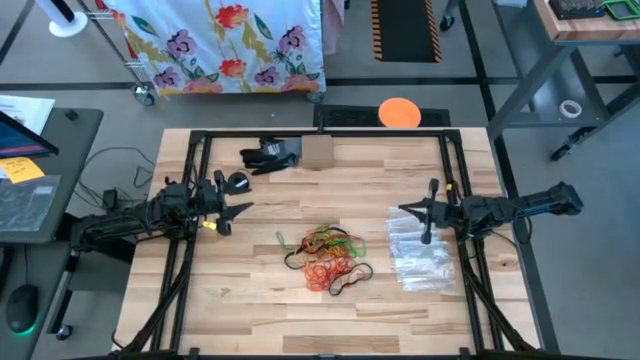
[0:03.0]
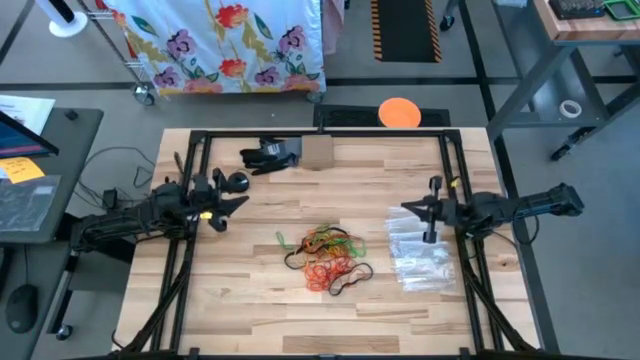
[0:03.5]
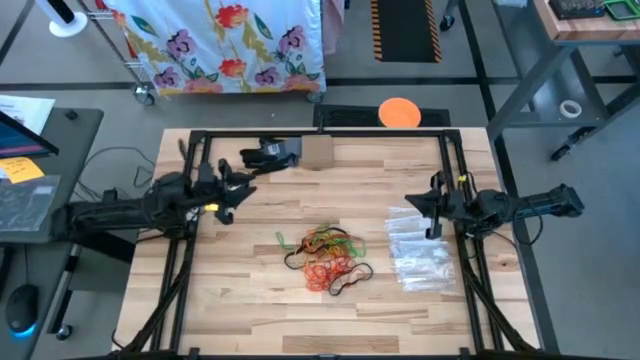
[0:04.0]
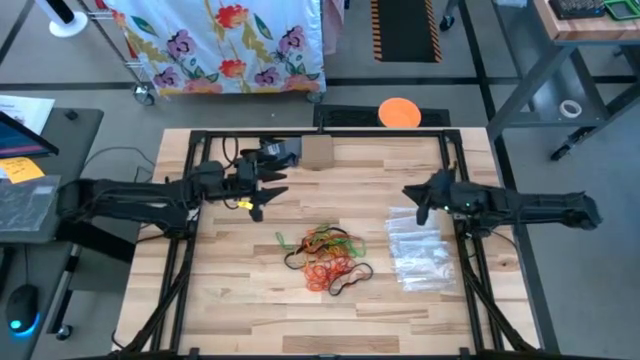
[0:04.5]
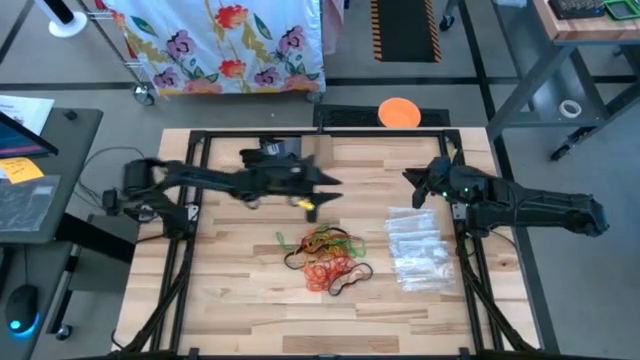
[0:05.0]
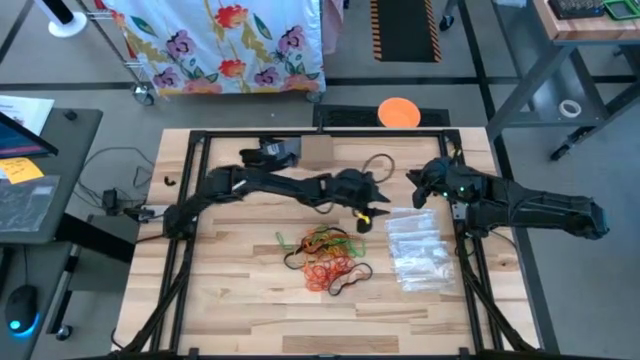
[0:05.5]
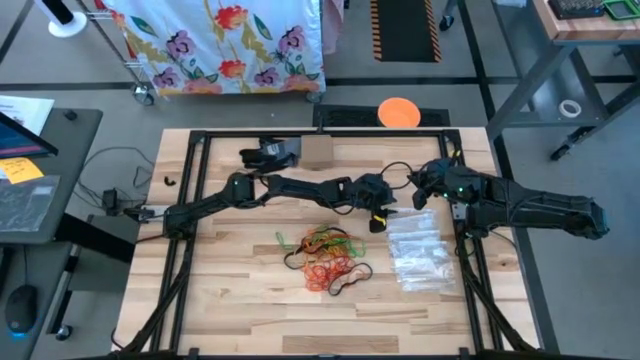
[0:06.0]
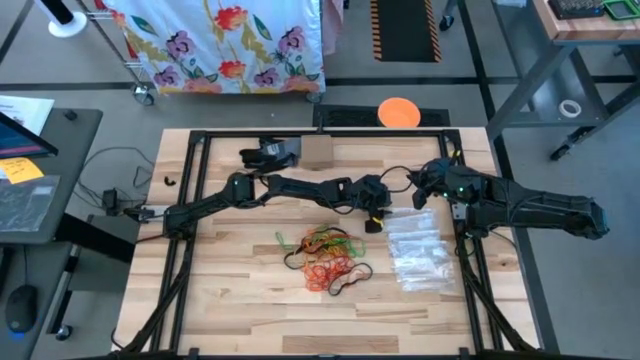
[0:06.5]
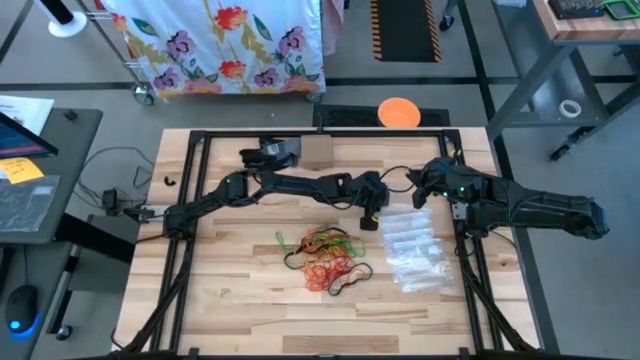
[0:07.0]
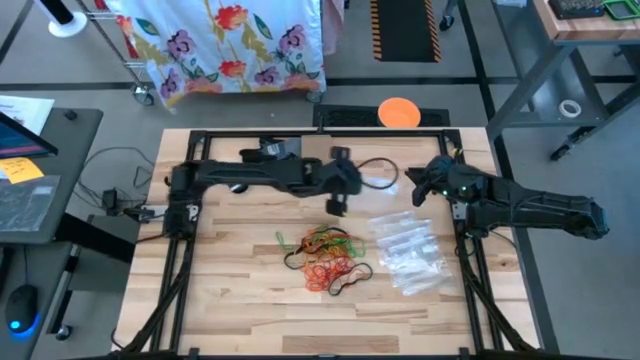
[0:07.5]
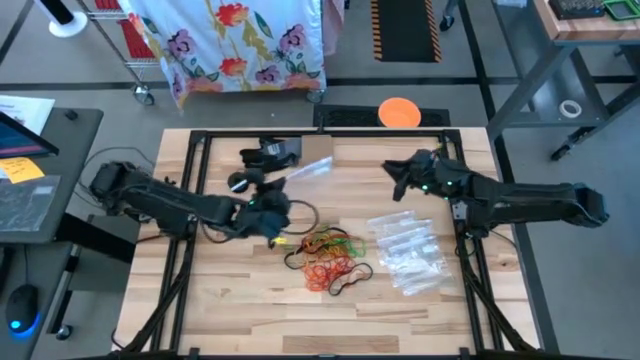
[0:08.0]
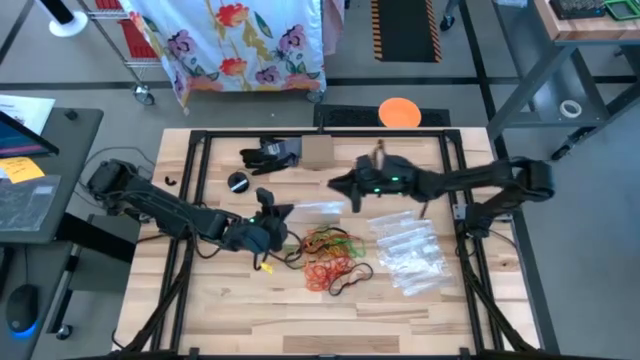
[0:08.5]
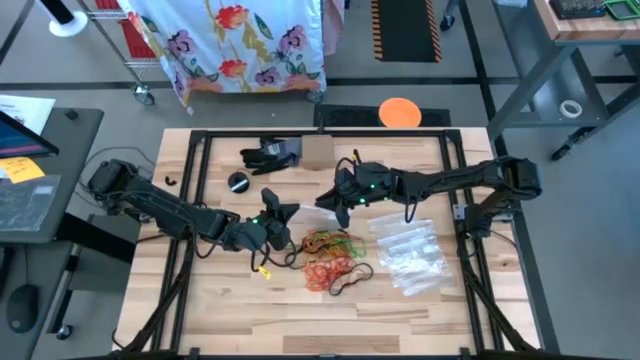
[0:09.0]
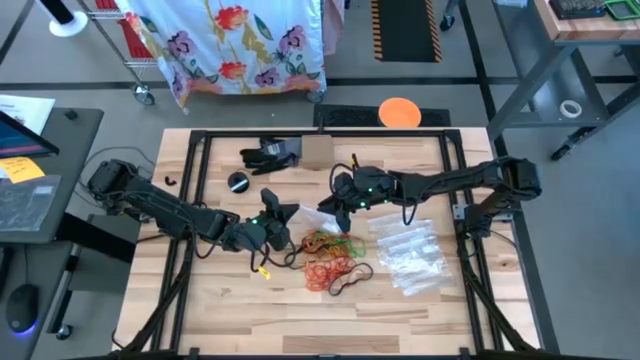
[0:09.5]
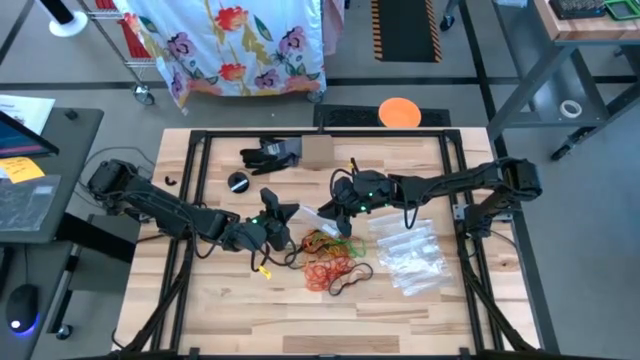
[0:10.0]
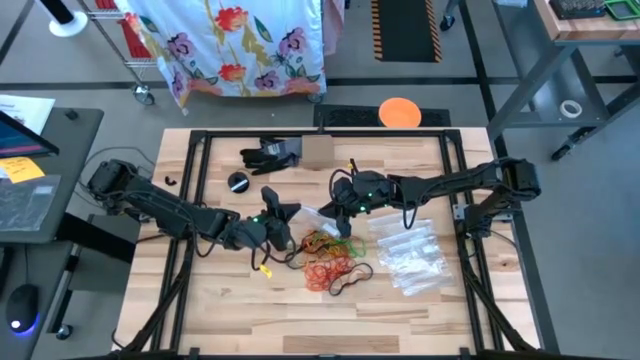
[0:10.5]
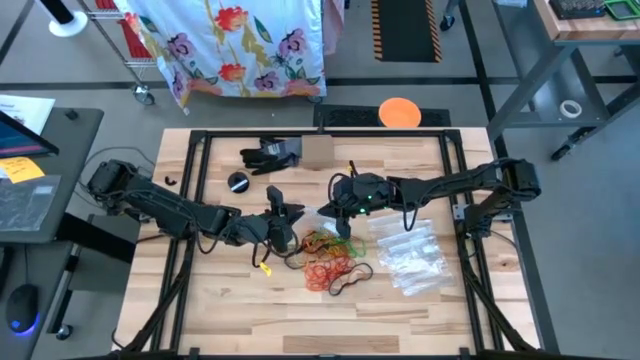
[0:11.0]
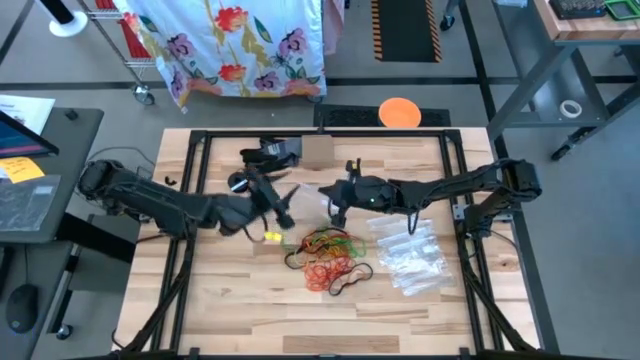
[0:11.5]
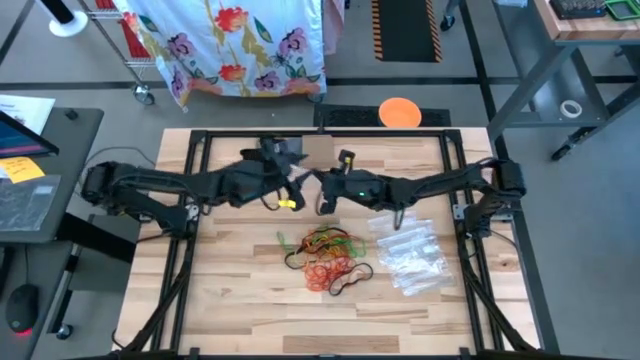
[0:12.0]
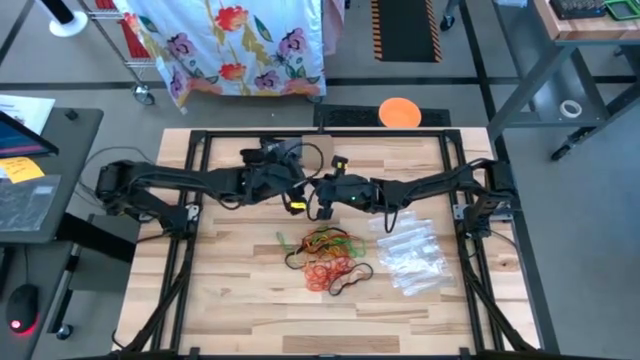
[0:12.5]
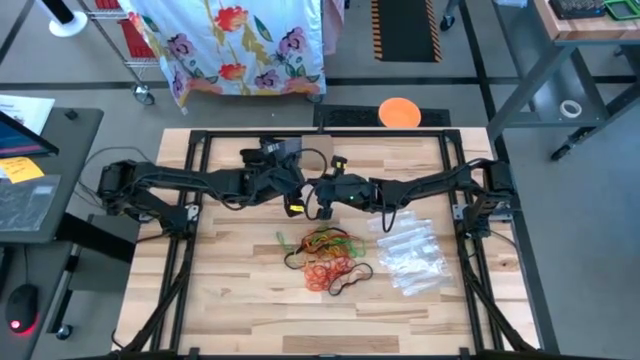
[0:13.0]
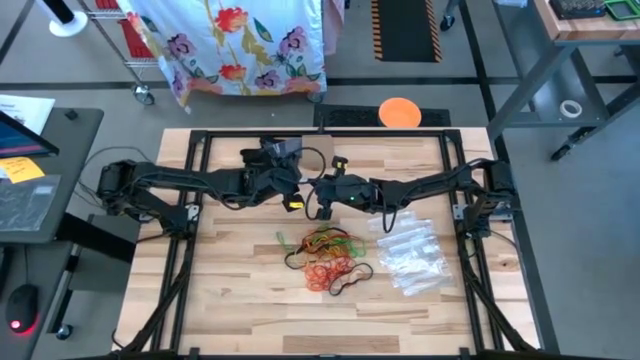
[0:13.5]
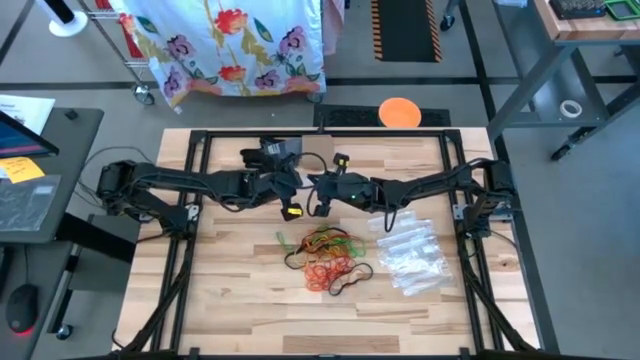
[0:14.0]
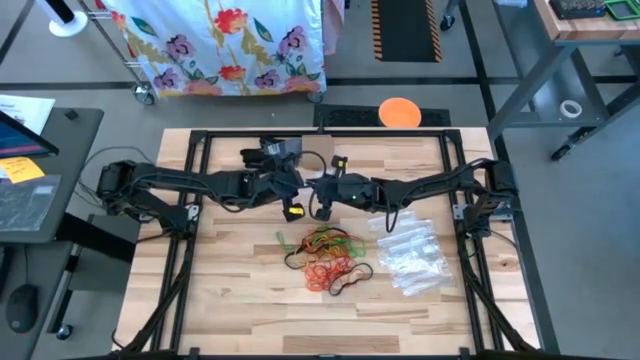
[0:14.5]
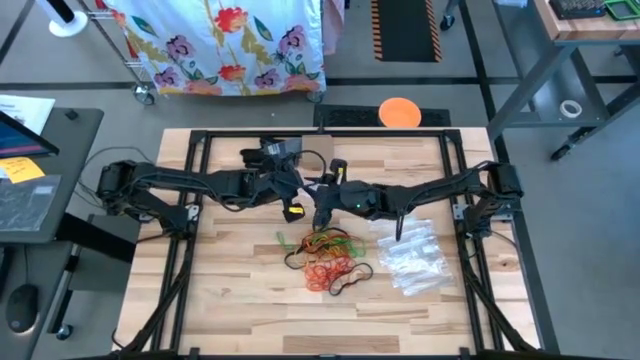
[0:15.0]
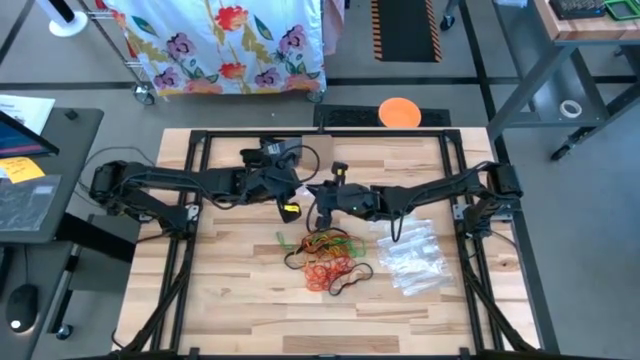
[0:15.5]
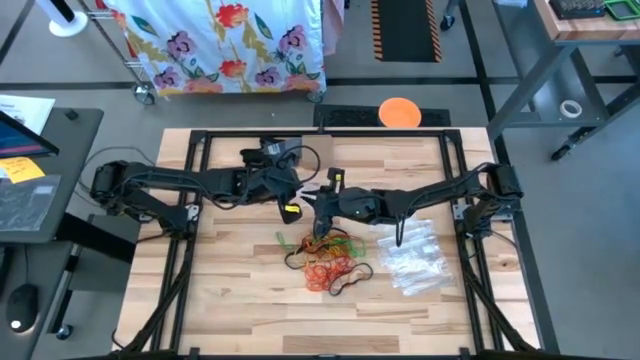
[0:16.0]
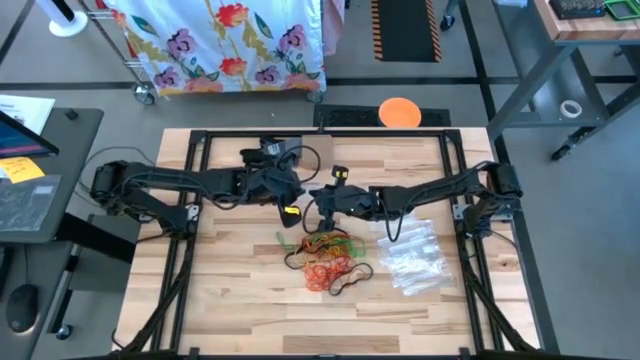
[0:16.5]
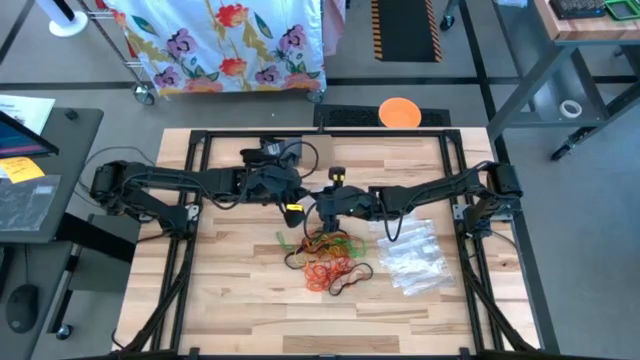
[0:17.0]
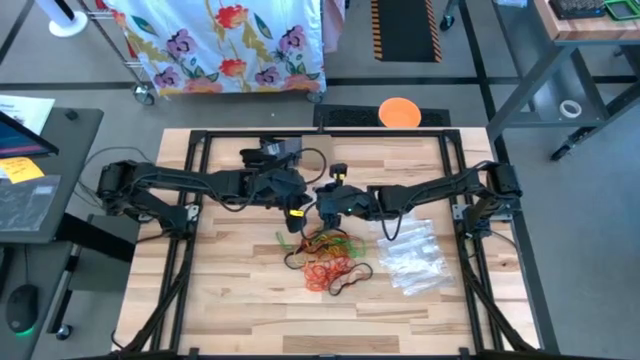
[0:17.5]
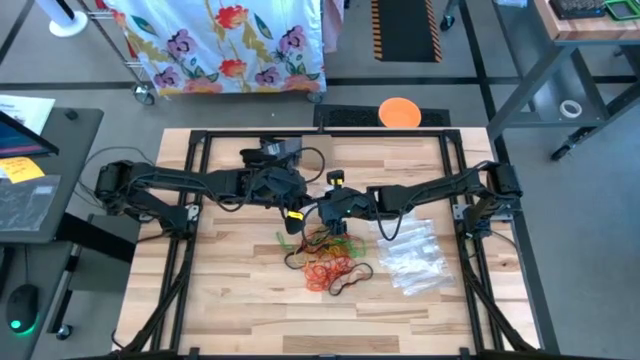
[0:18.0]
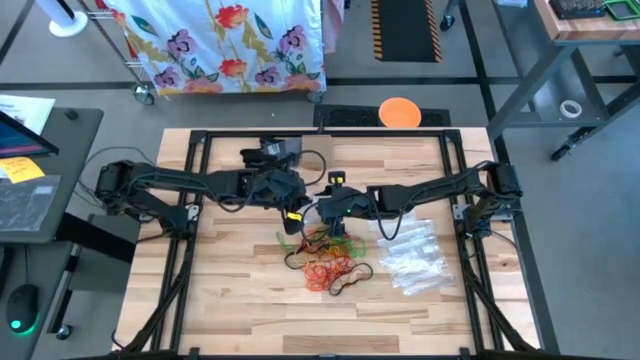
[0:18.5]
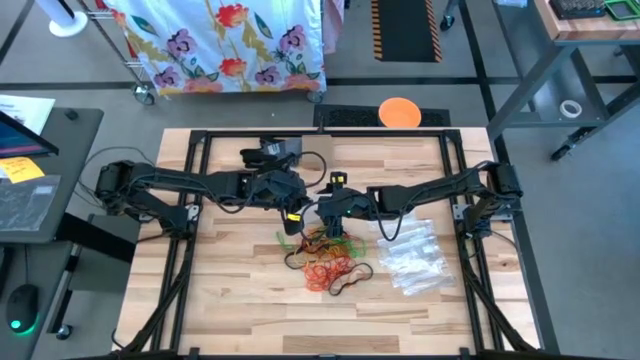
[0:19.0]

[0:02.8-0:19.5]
Task: Sort rubber bands
Open the transparent zip bag
